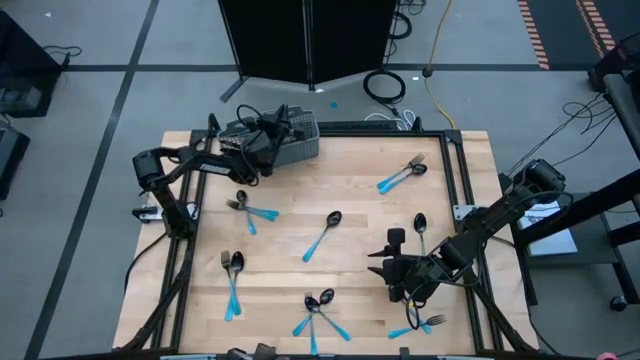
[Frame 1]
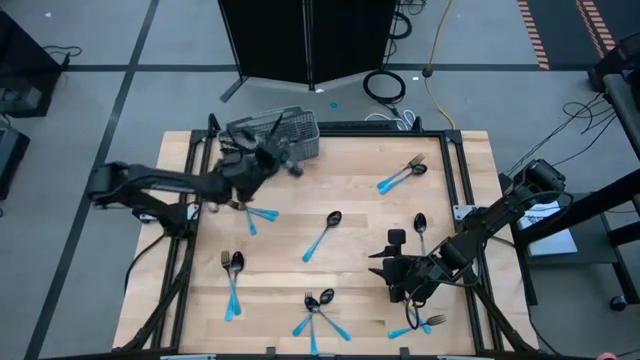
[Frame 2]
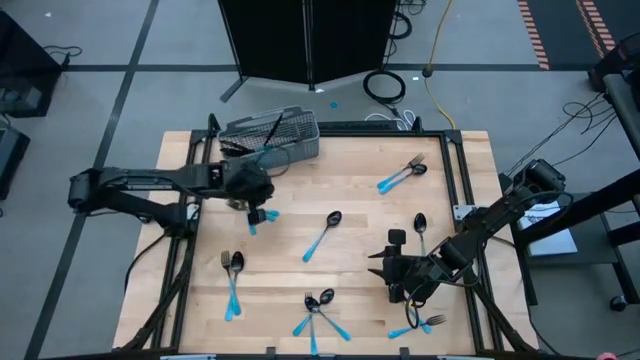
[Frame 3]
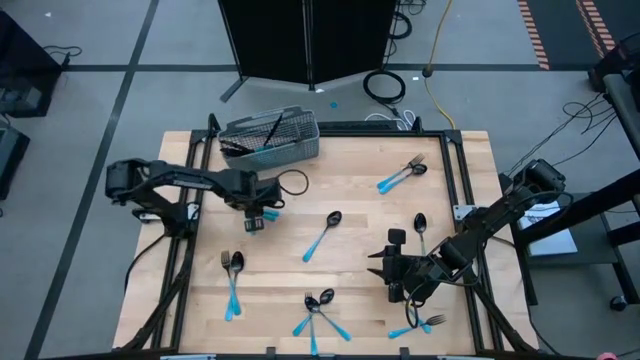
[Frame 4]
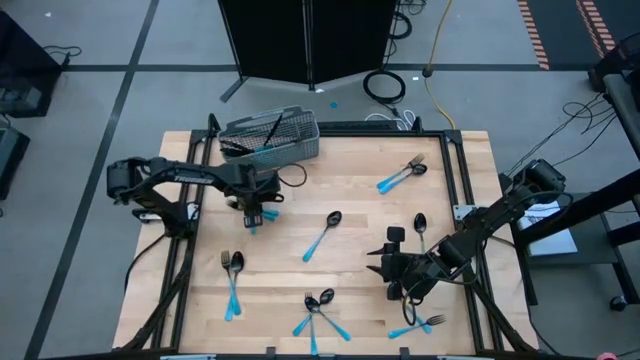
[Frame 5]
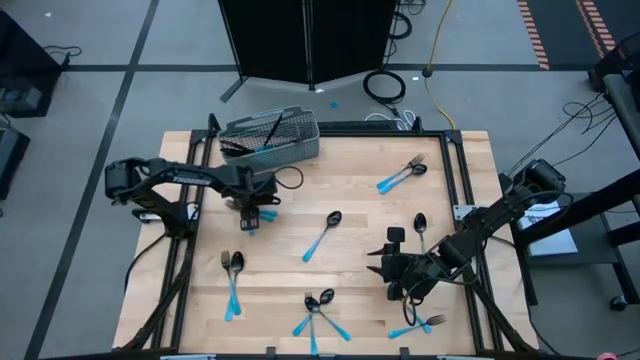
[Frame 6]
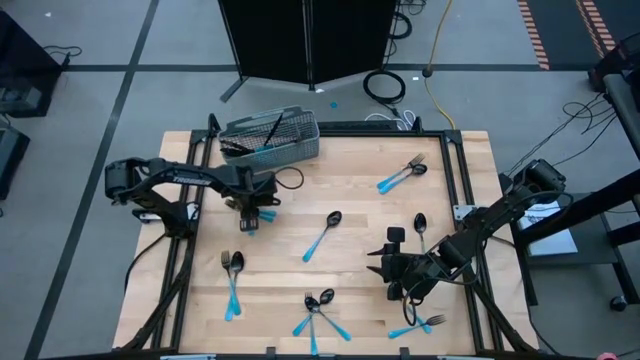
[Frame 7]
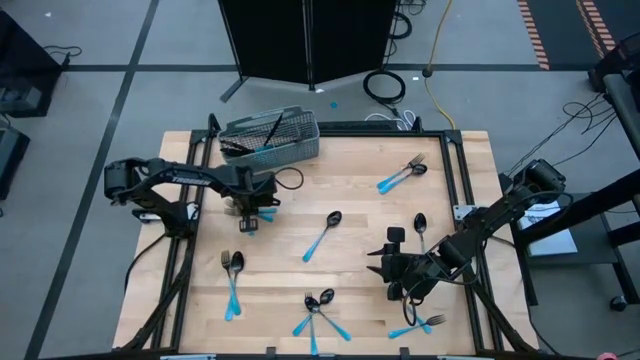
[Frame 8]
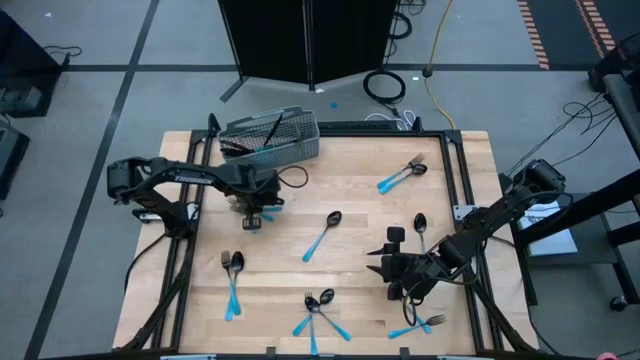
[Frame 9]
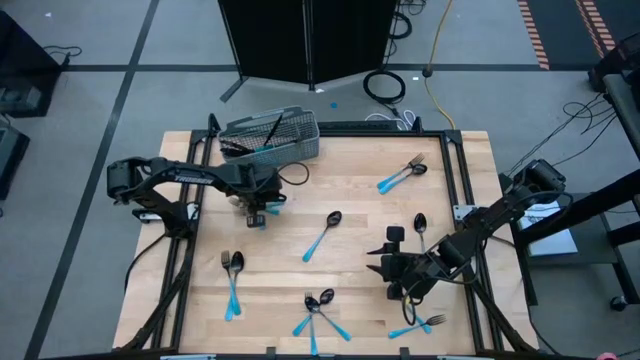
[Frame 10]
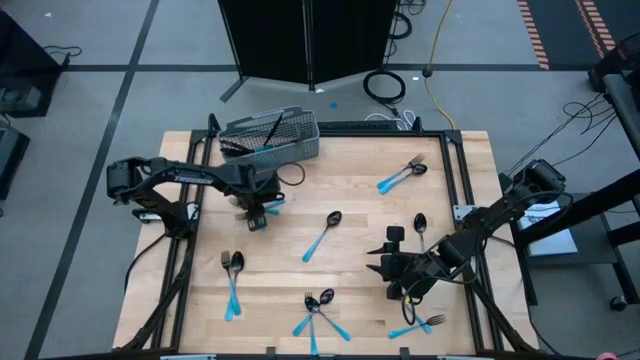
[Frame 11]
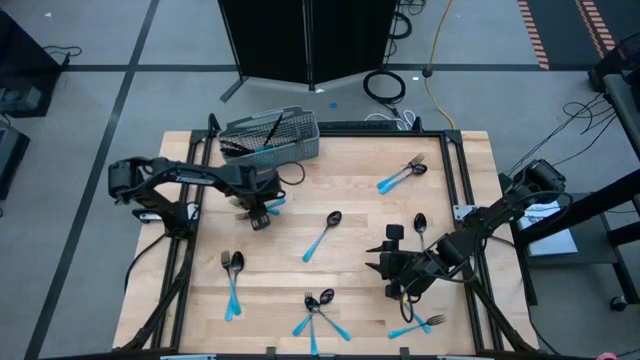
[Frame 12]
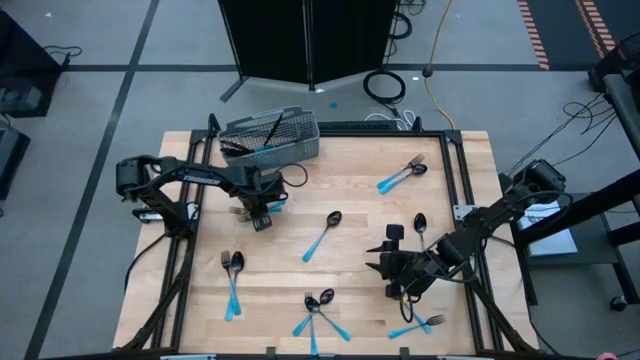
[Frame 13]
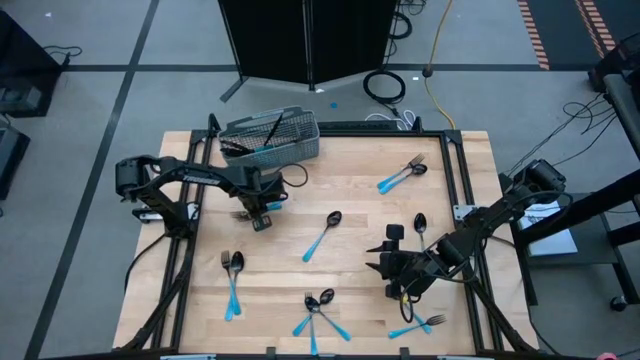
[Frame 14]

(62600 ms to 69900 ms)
Task: Sort silverware
Put the blue fork into the silverware basket

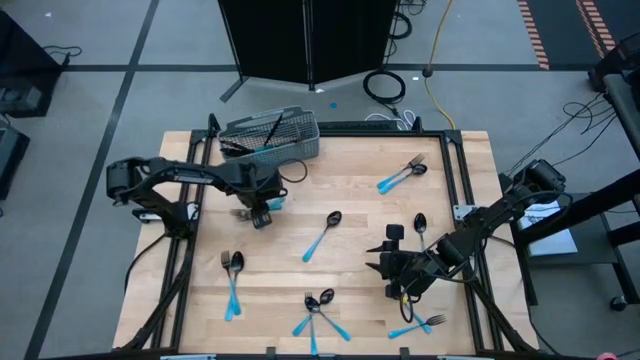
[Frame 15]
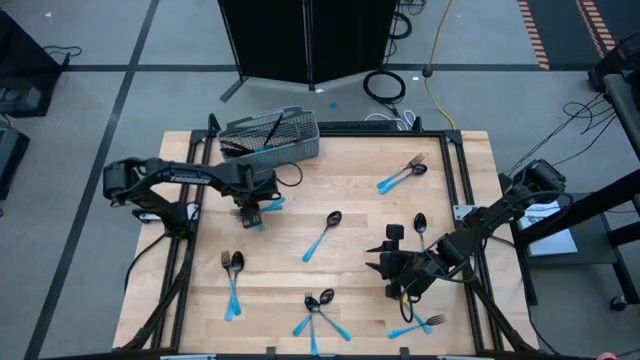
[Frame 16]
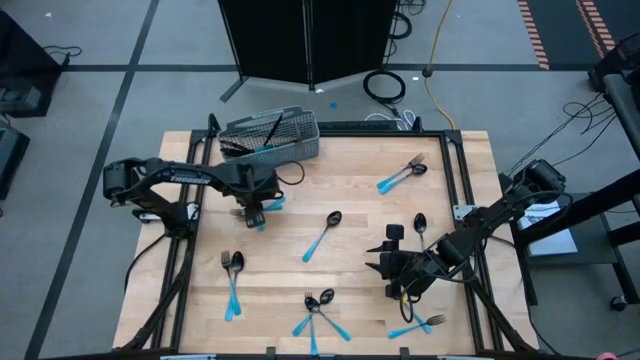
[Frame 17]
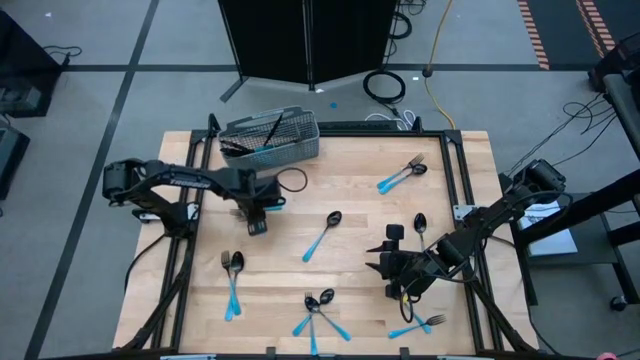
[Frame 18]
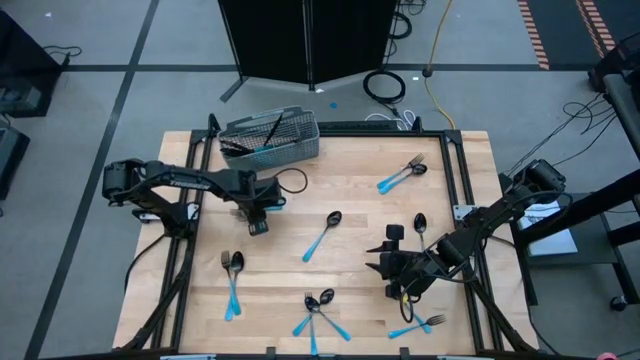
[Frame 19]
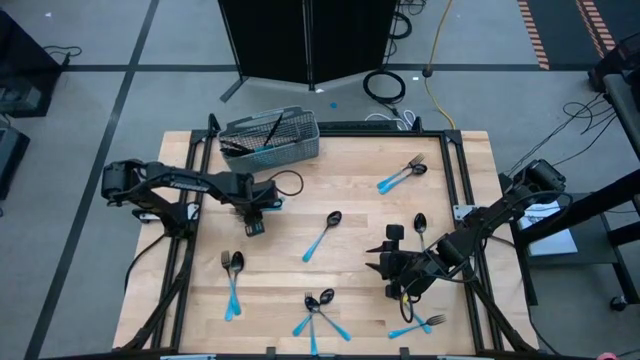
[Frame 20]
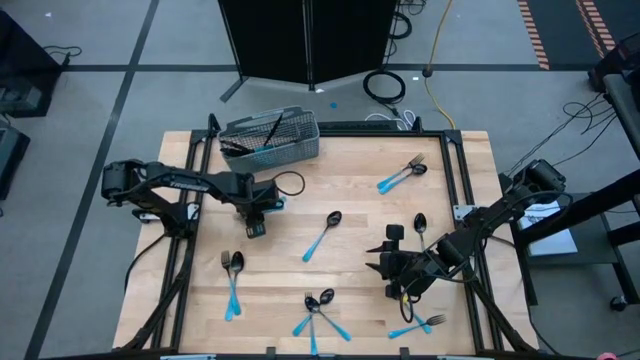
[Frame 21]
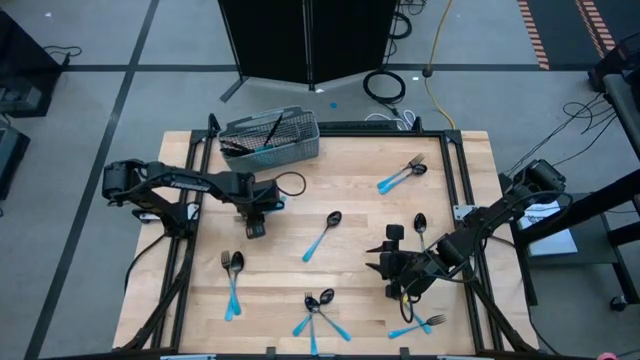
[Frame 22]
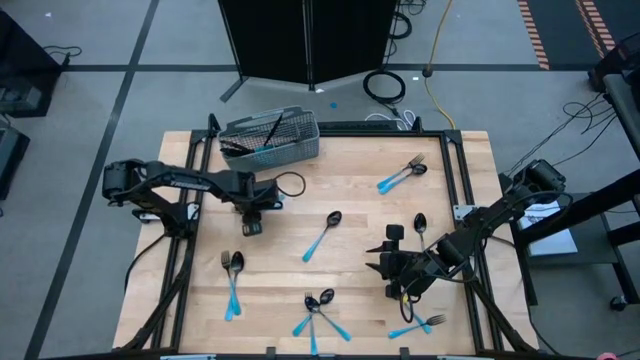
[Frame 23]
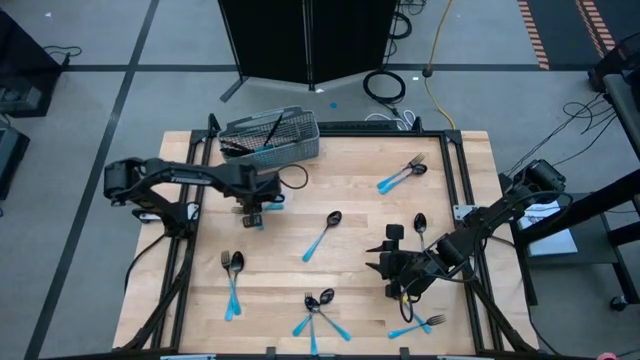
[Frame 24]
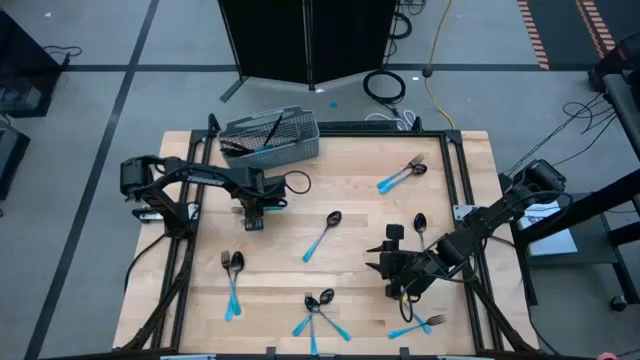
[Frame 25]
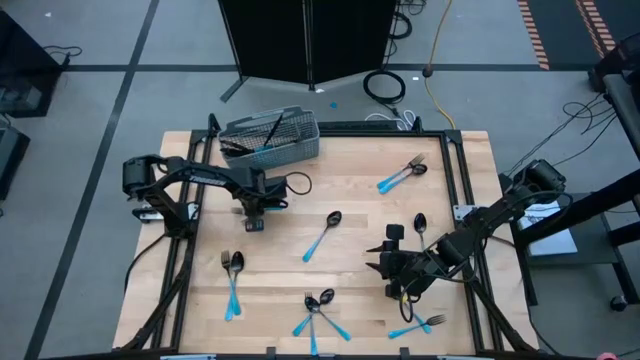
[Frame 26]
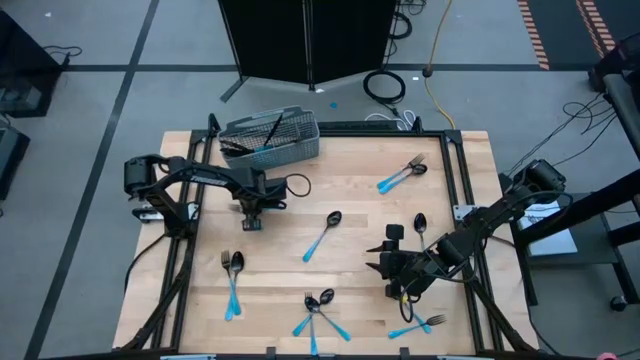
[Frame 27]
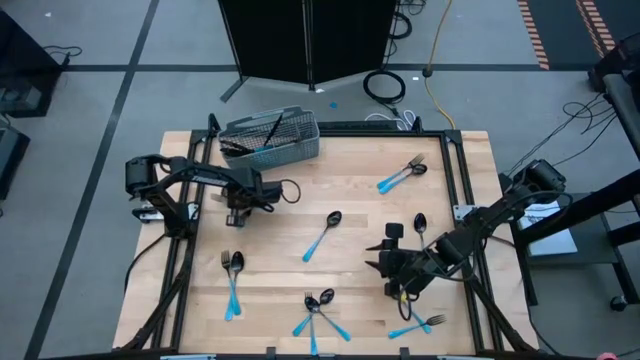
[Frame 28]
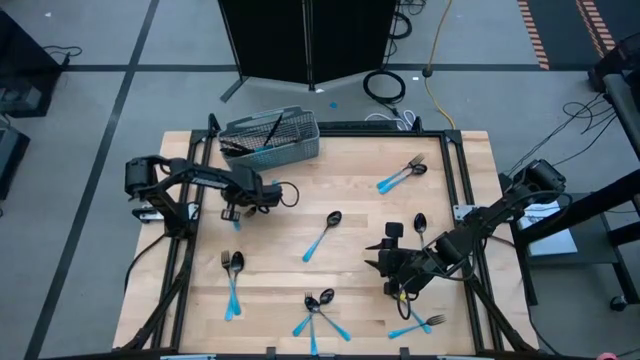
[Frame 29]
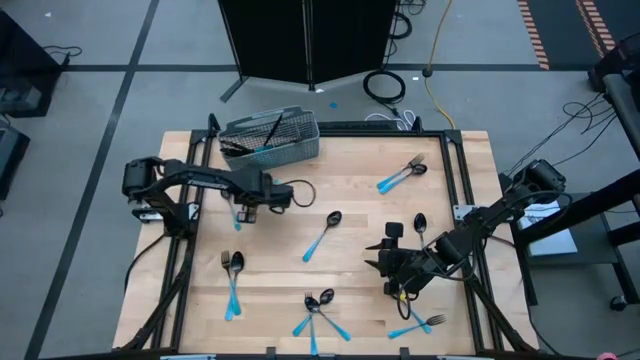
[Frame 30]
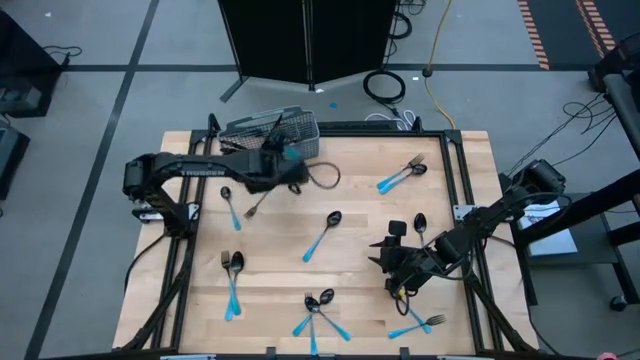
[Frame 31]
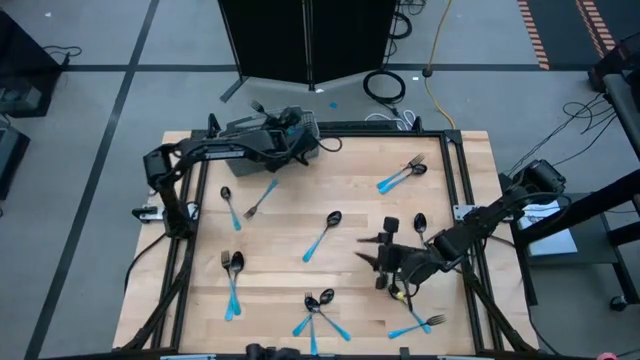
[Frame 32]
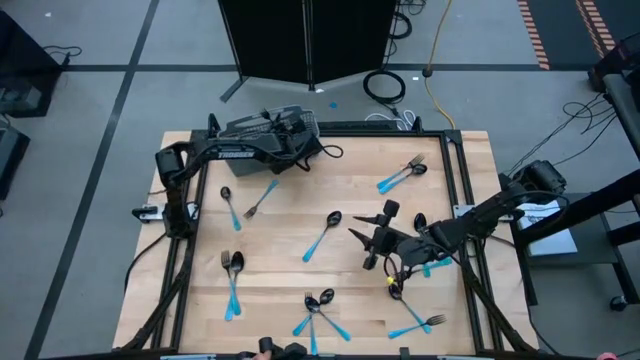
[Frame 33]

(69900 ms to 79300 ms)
Put the blue fork into the silverware basket

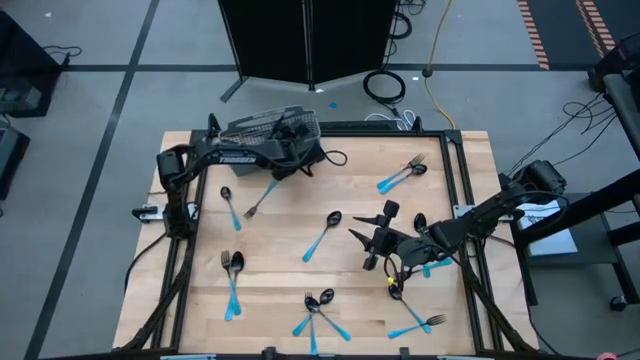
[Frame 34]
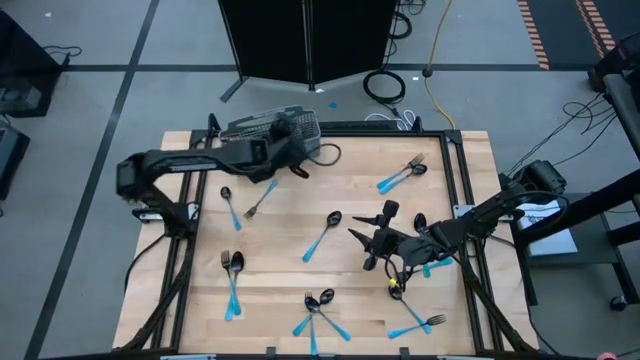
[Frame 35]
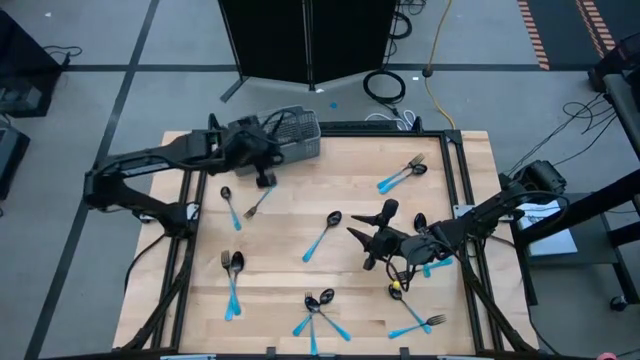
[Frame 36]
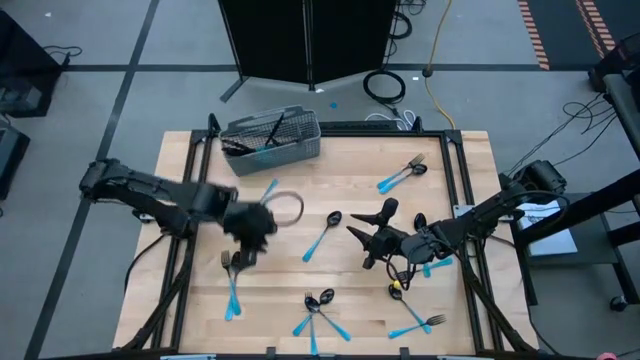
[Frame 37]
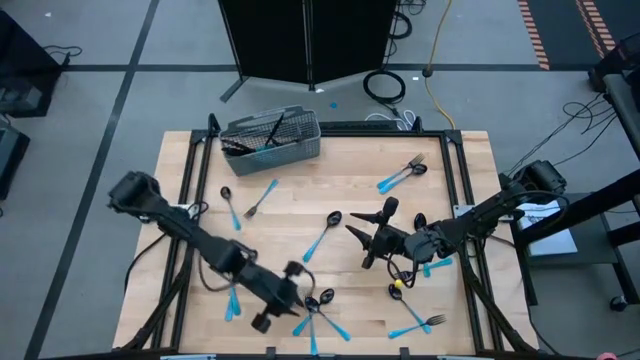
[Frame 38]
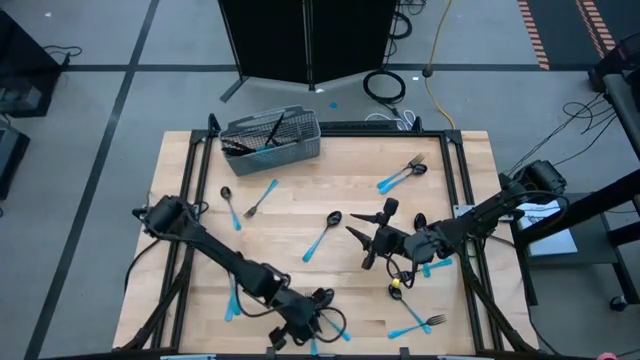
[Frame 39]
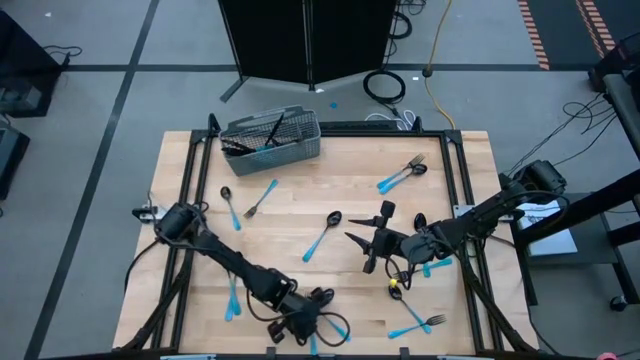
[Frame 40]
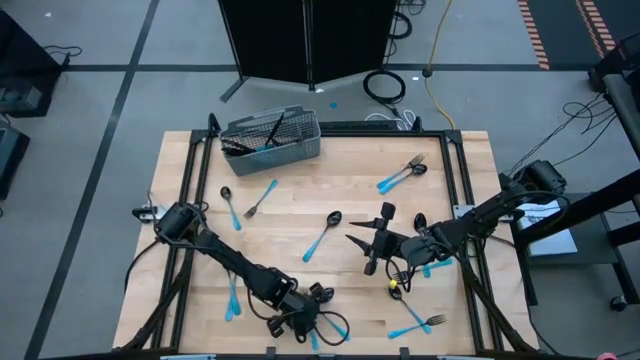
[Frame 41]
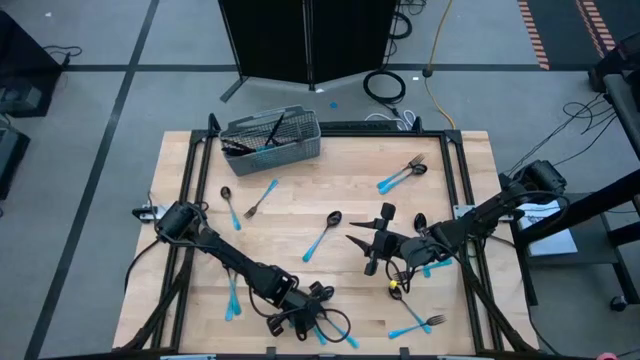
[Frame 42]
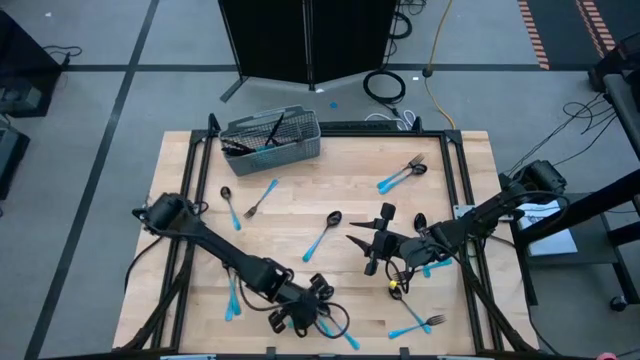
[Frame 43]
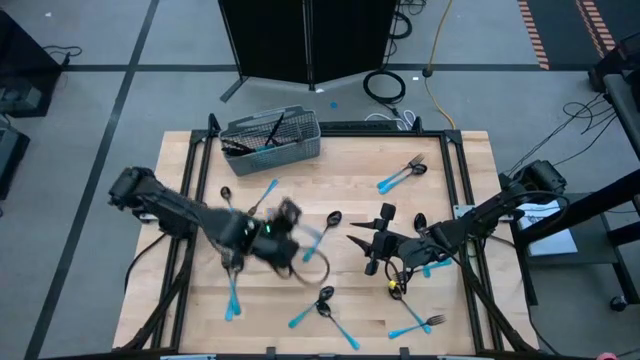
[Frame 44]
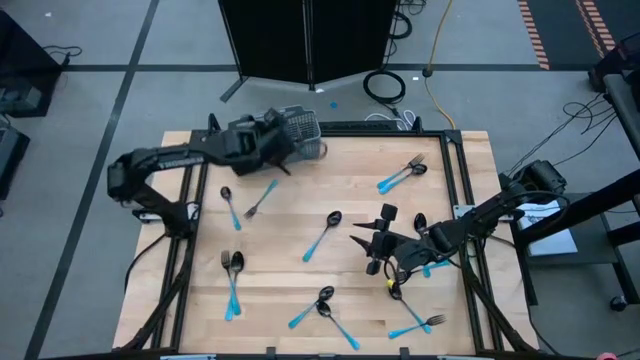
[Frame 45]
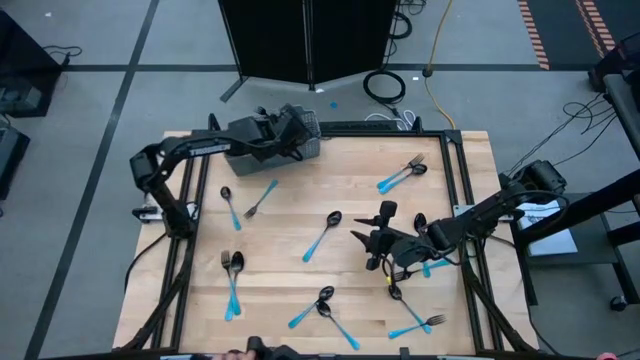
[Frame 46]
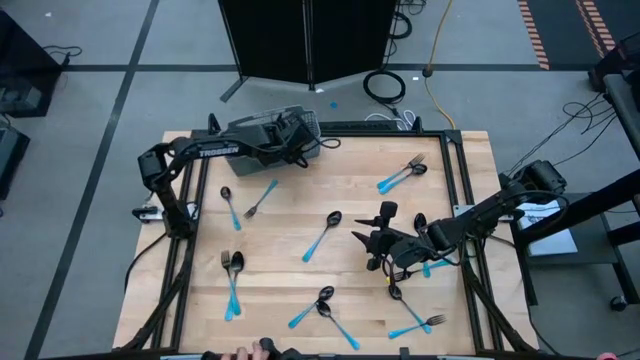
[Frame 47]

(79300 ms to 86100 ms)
Put the blue fork into the silverware basket
